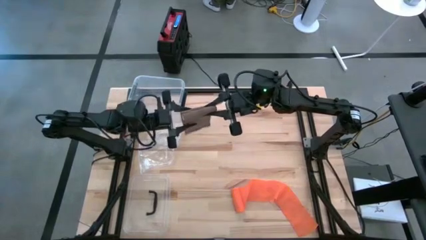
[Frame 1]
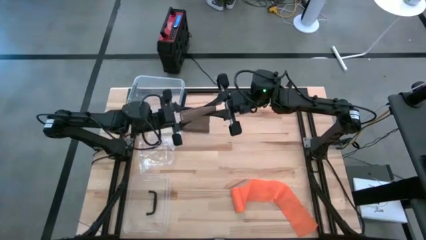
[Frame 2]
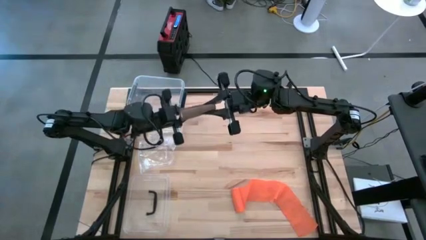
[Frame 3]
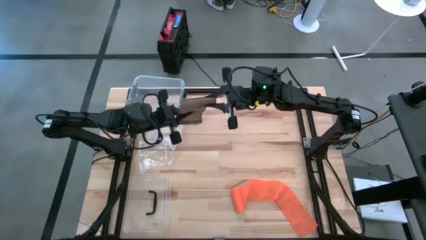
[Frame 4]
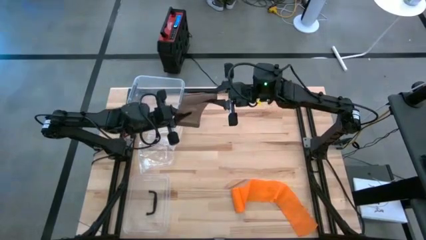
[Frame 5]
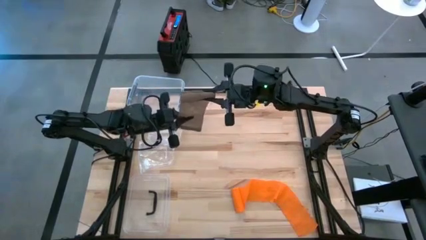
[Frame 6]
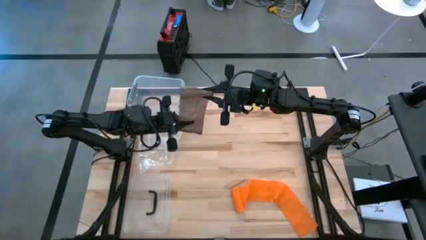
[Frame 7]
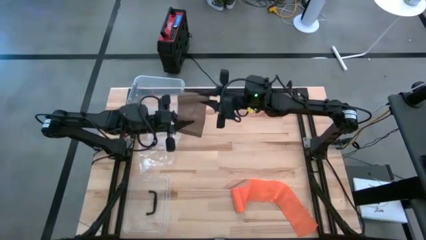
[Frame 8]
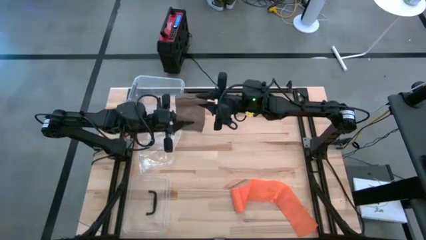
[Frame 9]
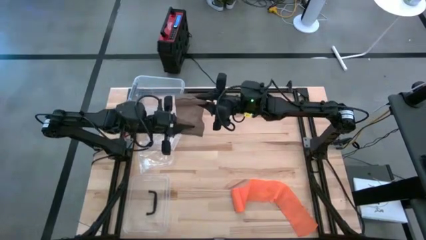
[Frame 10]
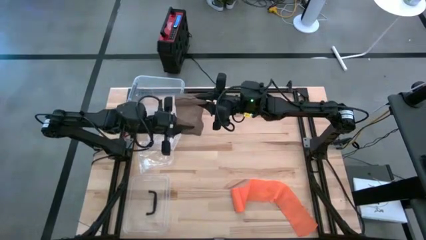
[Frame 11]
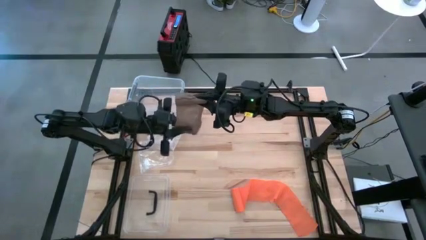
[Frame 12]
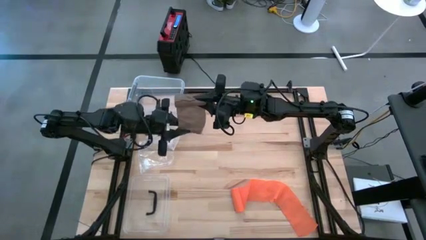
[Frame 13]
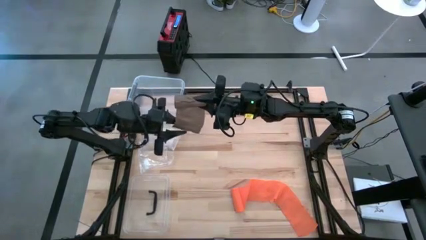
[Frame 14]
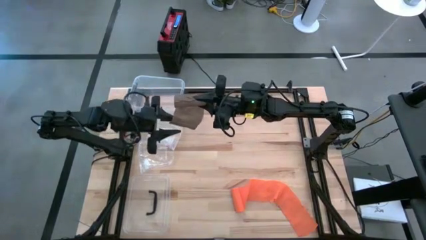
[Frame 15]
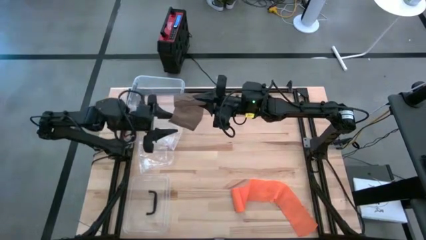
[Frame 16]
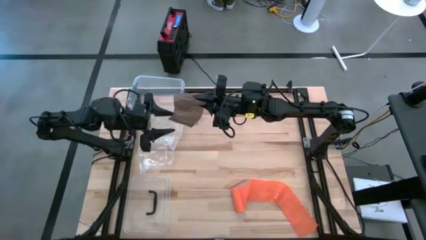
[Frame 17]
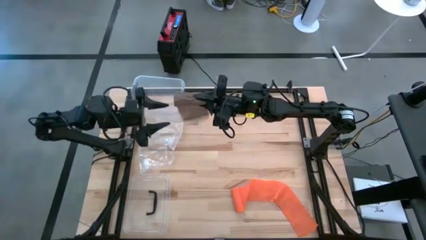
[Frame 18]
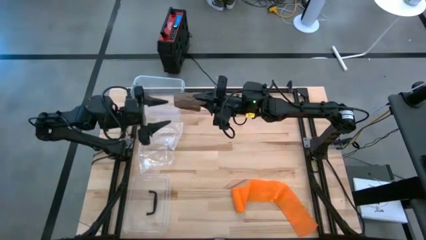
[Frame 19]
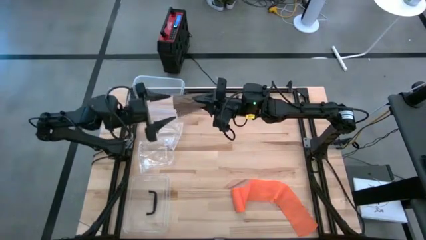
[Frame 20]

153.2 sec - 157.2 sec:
Task: Roll bandage
Roll the brown bandage

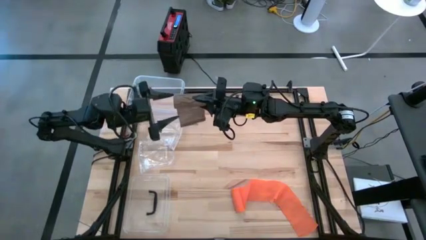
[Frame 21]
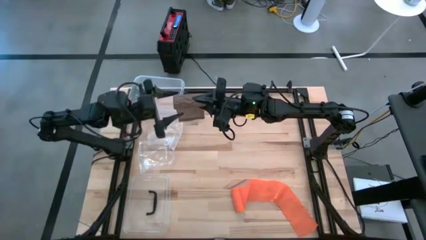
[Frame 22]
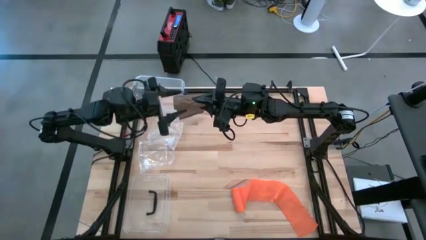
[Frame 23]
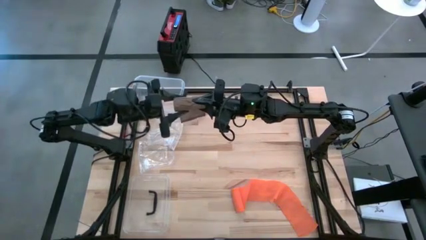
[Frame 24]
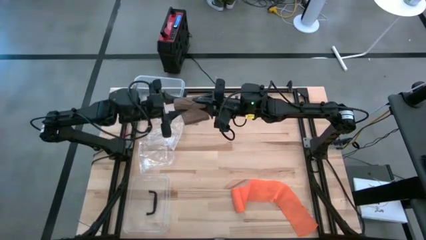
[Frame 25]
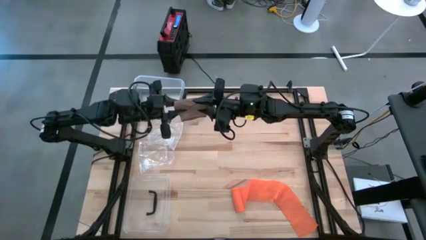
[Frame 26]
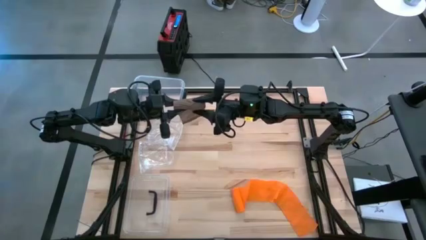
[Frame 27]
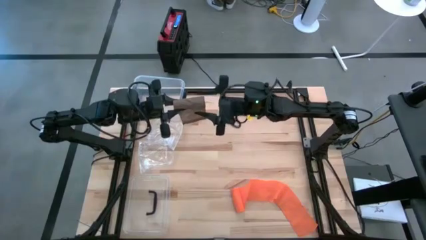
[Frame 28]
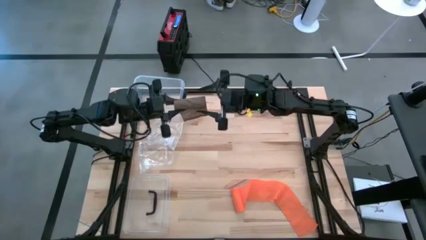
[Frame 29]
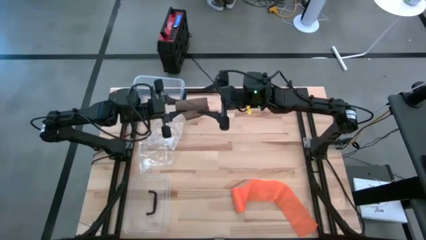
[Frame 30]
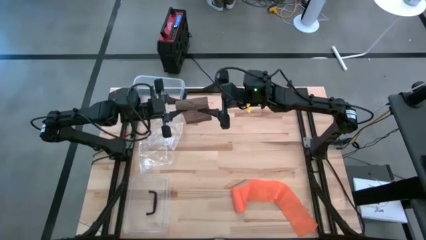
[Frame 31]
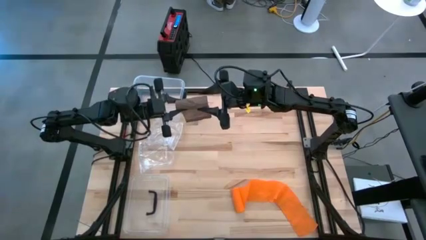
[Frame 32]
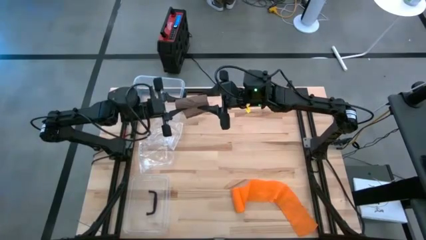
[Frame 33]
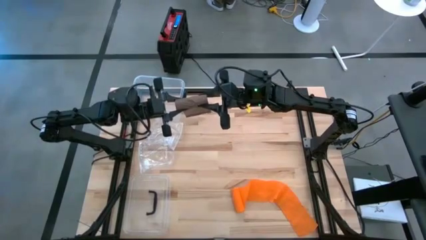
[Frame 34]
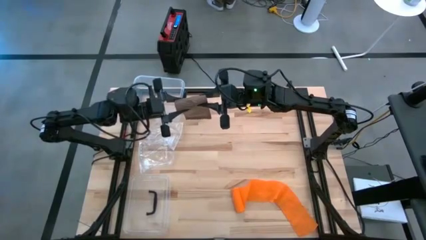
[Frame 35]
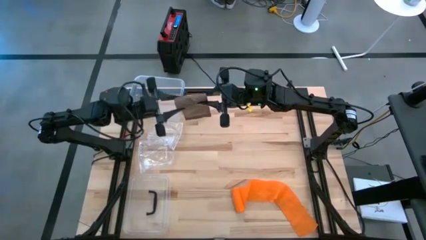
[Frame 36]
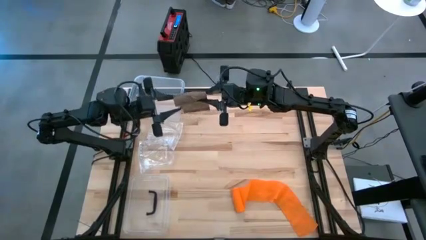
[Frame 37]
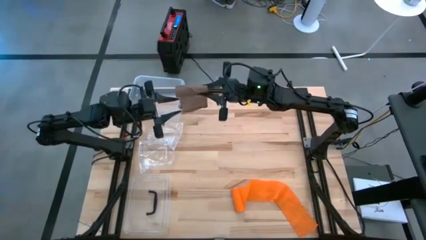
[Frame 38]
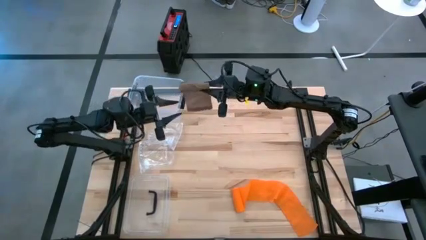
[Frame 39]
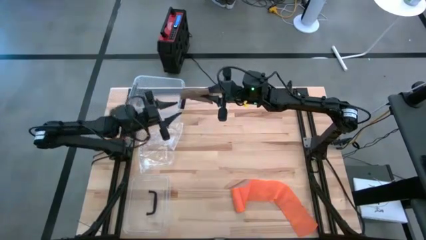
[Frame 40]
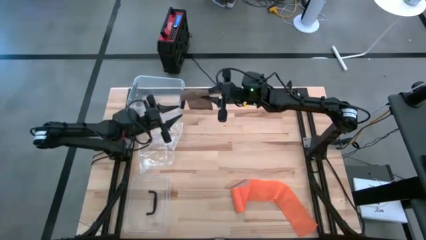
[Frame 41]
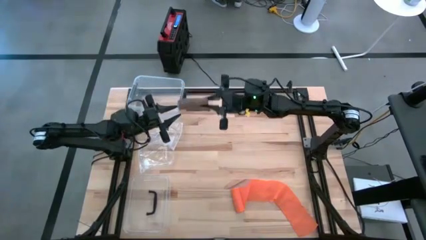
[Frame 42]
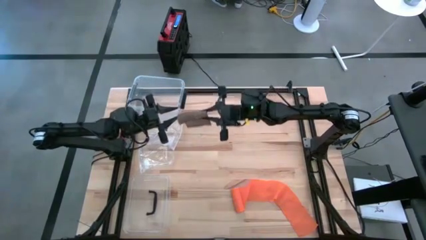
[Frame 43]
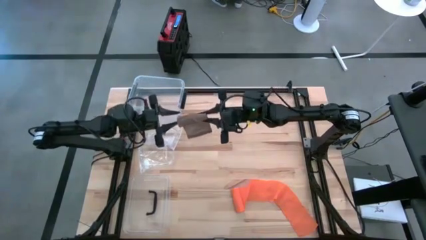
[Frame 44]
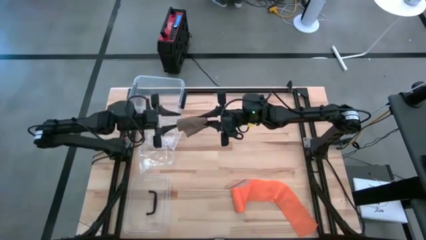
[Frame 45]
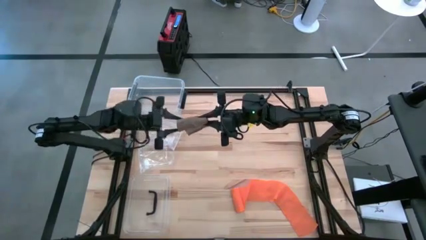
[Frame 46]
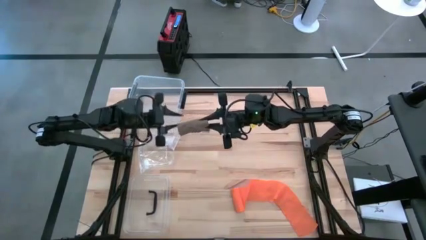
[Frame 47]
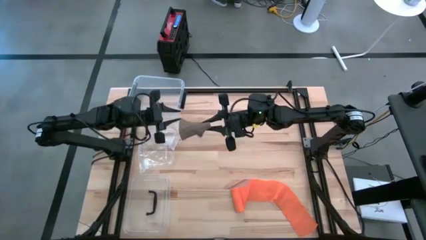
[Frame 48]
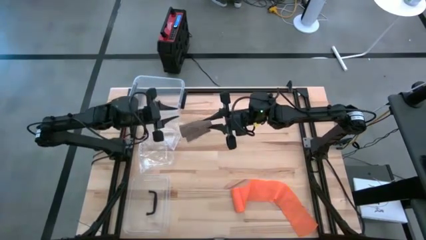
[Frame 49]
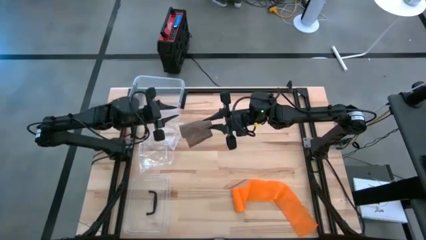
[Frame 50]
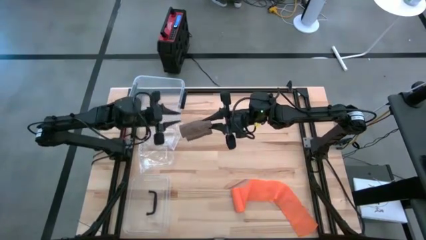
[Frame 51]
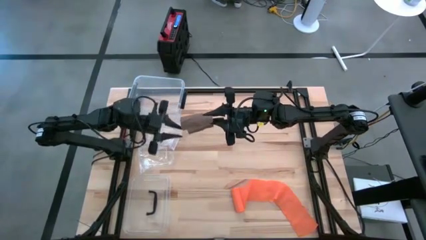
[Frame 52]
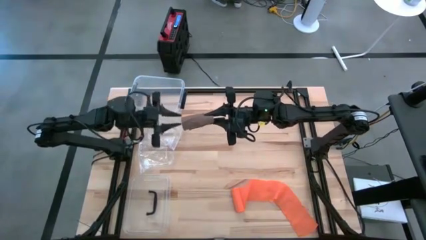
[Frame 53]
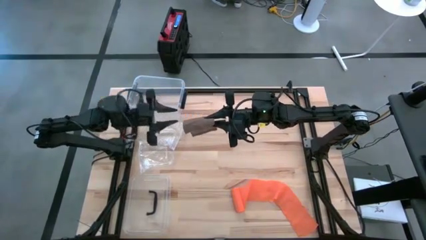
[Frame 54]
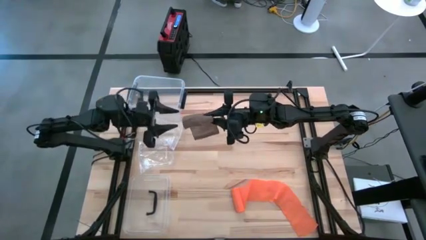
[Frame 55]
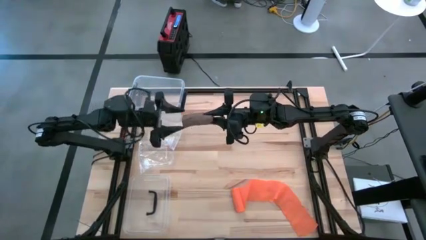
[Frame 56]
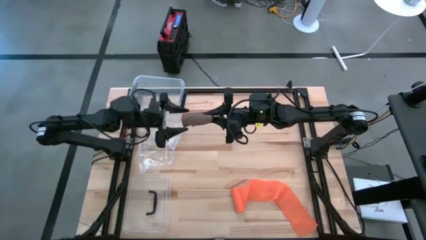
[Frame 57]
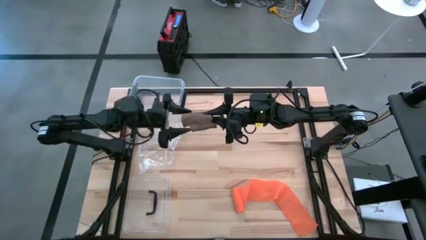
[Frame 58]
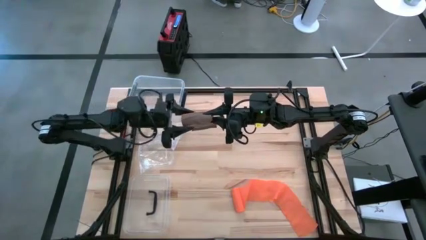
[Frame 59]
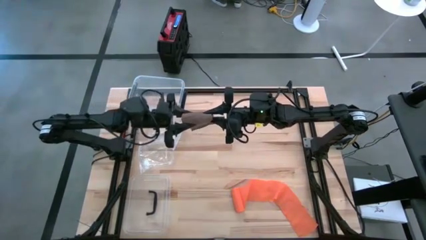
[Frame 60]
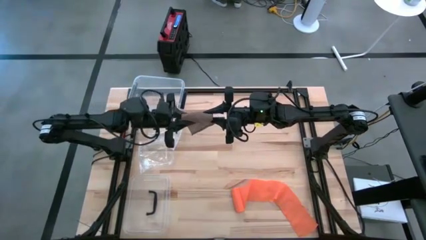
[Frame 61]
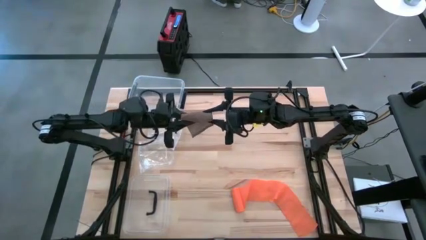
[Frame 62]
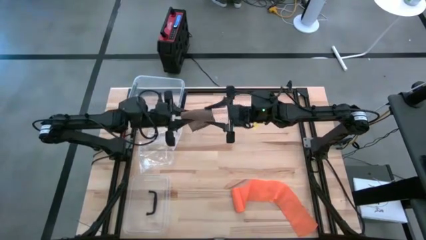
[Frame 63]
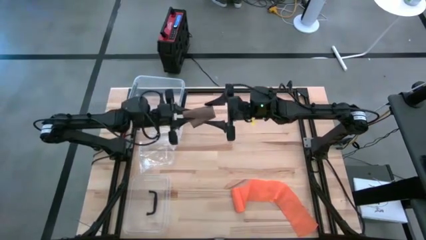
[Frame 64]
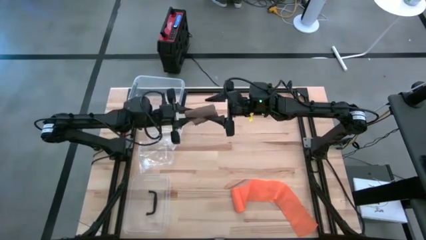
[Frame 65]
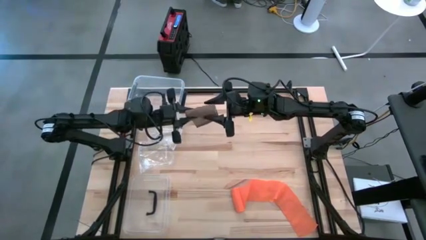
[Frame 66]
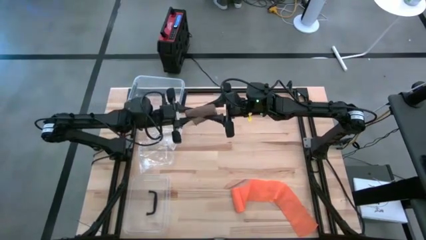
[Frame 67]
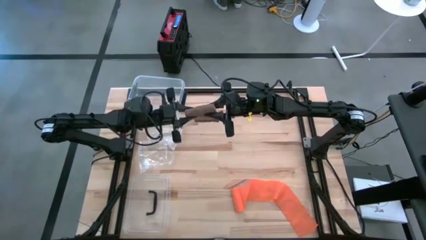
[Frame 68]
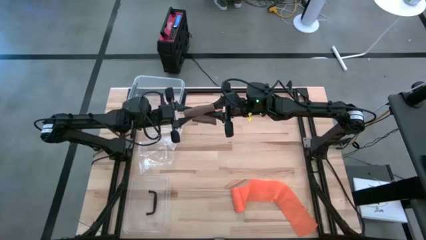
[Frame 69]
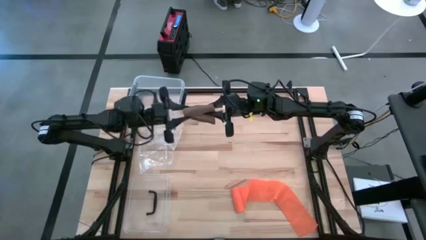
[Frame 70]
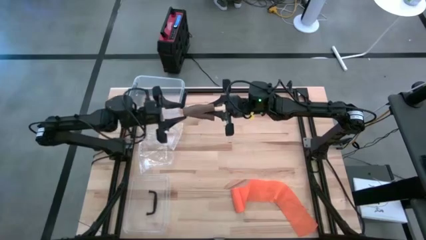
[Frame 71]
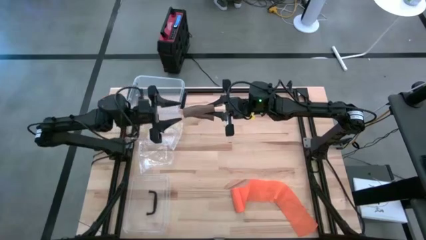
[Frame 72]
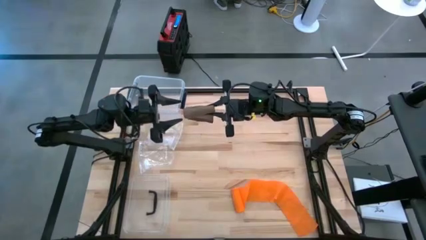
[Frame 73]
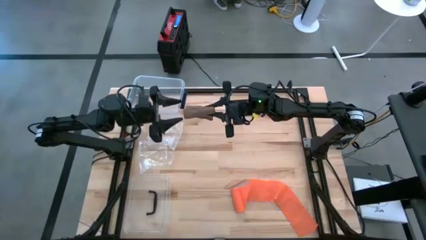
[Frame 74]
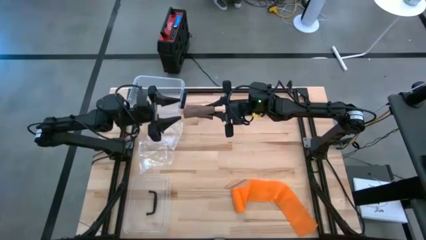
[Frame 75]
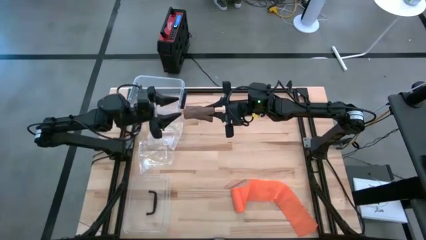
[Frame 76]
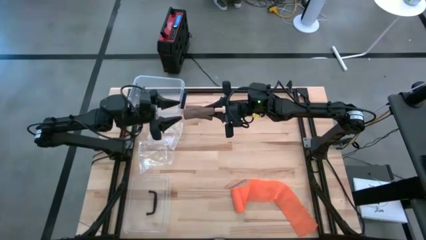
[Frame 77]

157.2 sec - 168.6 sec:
Roll the brown bandage
